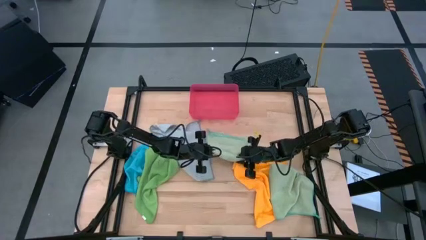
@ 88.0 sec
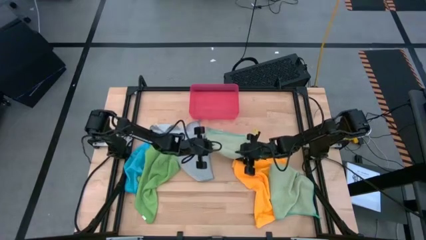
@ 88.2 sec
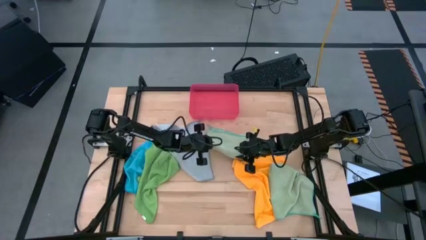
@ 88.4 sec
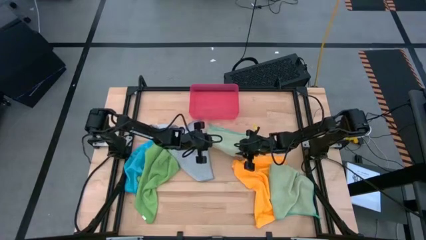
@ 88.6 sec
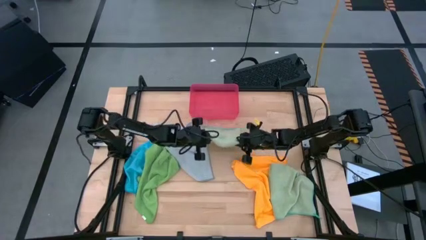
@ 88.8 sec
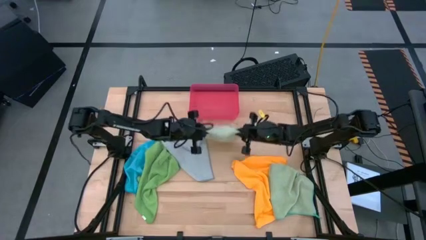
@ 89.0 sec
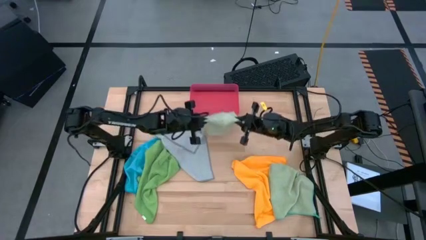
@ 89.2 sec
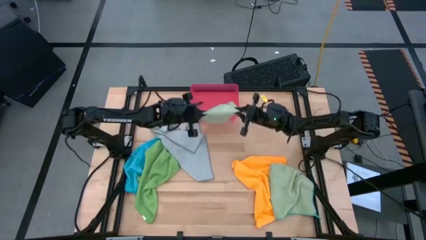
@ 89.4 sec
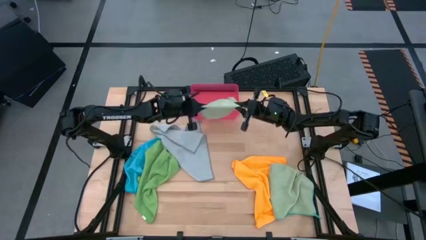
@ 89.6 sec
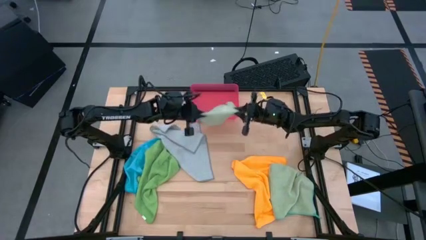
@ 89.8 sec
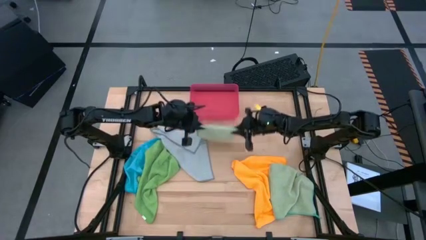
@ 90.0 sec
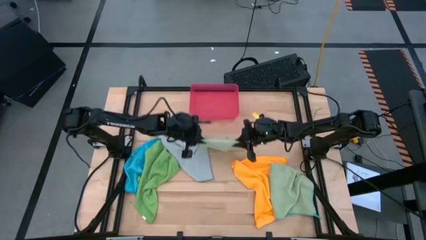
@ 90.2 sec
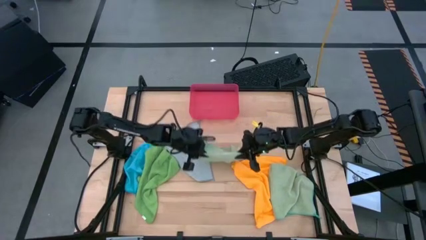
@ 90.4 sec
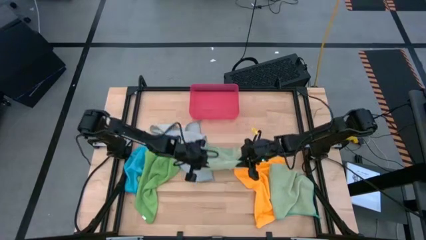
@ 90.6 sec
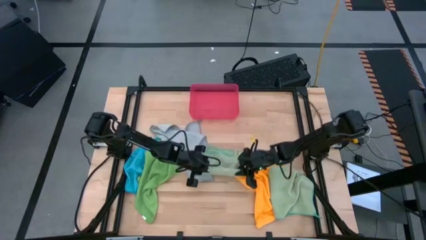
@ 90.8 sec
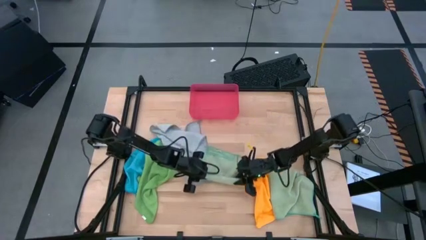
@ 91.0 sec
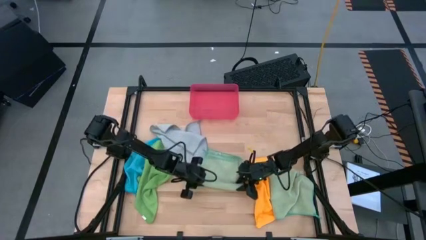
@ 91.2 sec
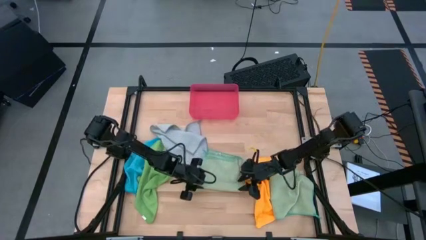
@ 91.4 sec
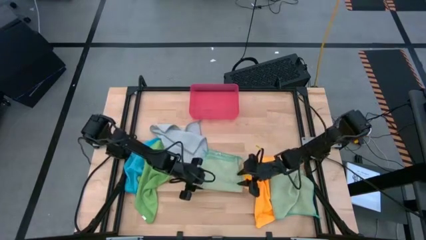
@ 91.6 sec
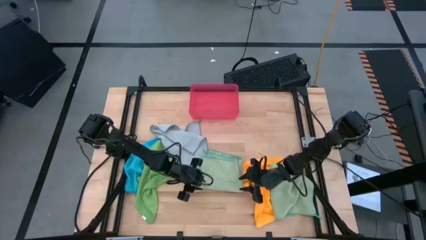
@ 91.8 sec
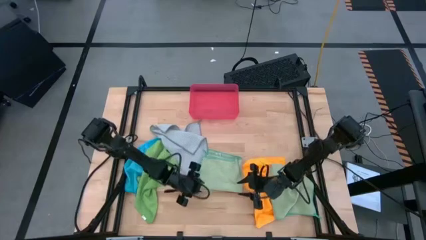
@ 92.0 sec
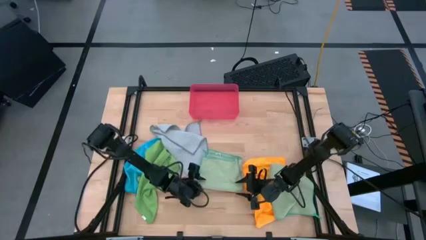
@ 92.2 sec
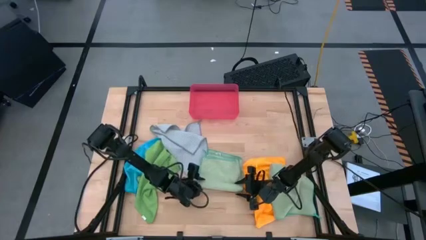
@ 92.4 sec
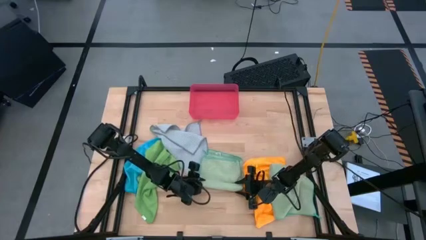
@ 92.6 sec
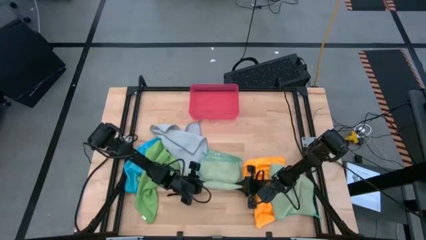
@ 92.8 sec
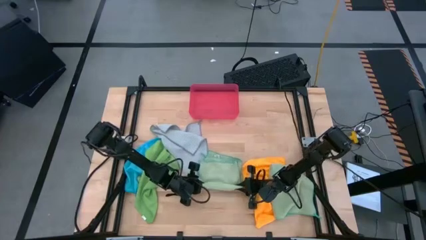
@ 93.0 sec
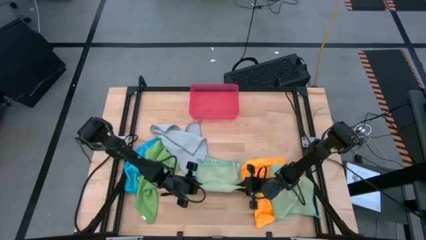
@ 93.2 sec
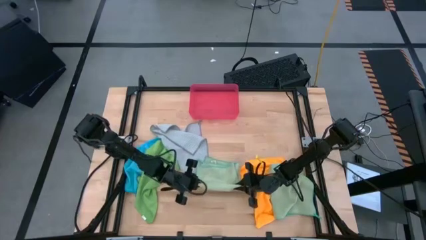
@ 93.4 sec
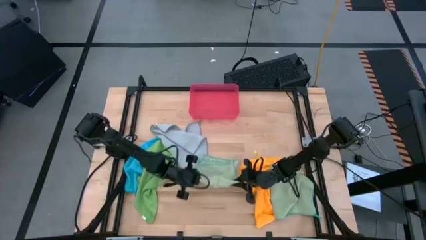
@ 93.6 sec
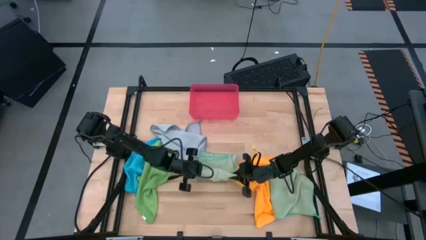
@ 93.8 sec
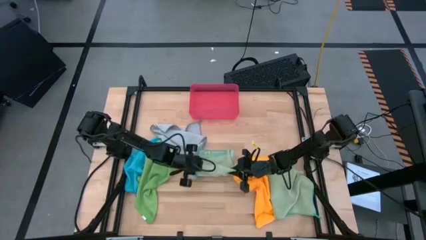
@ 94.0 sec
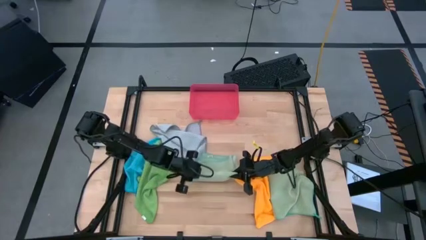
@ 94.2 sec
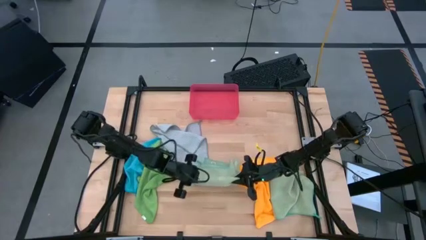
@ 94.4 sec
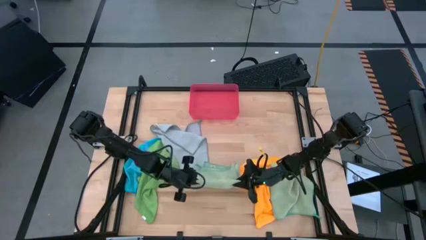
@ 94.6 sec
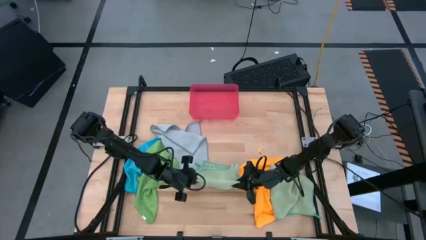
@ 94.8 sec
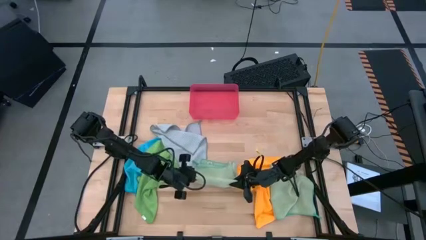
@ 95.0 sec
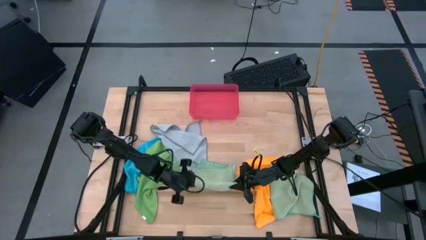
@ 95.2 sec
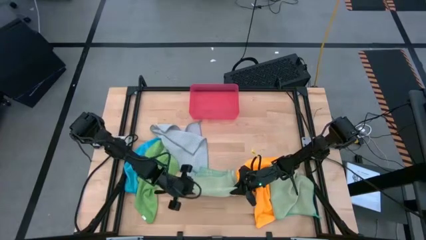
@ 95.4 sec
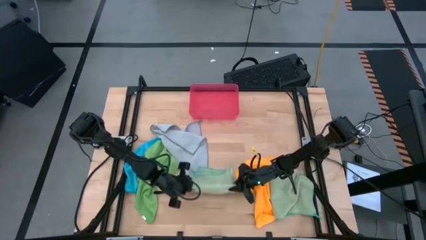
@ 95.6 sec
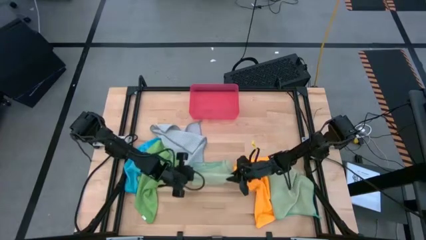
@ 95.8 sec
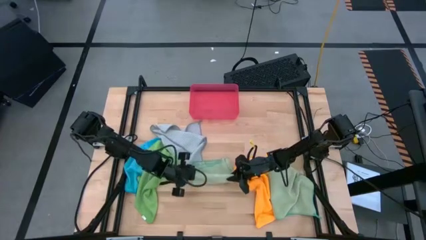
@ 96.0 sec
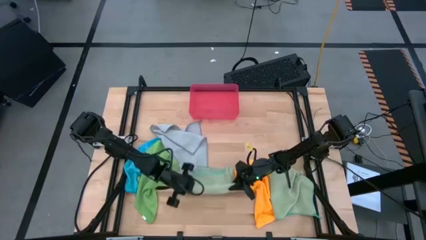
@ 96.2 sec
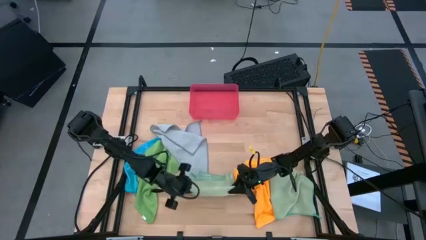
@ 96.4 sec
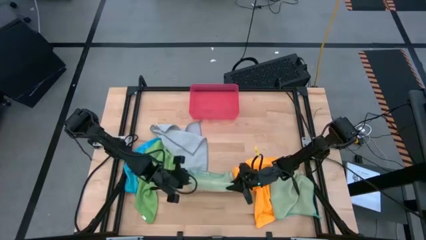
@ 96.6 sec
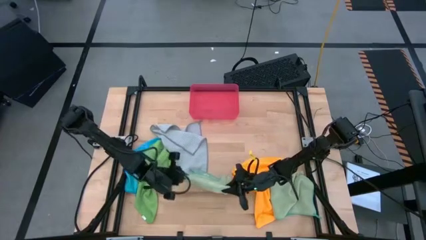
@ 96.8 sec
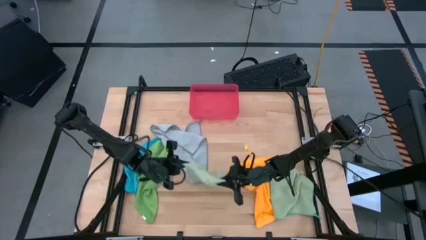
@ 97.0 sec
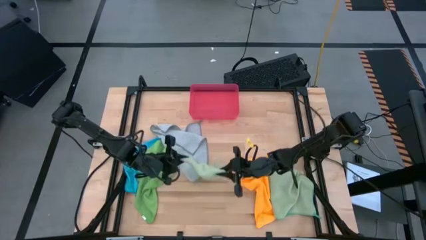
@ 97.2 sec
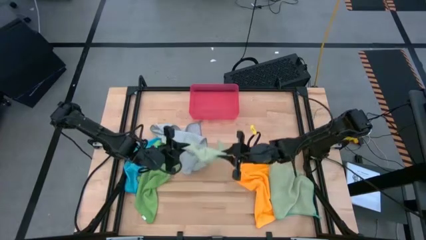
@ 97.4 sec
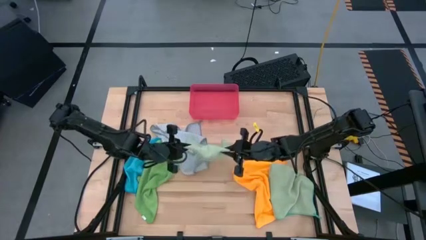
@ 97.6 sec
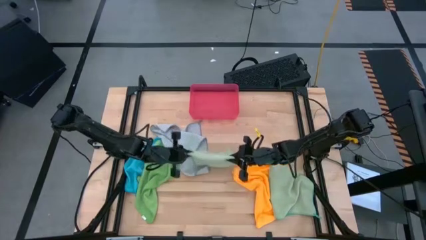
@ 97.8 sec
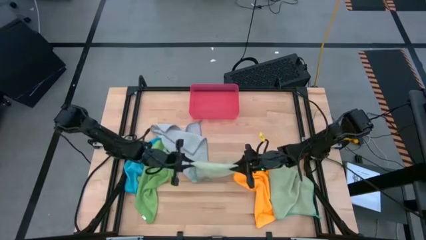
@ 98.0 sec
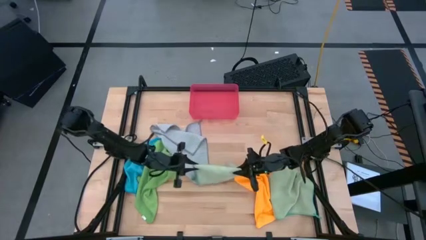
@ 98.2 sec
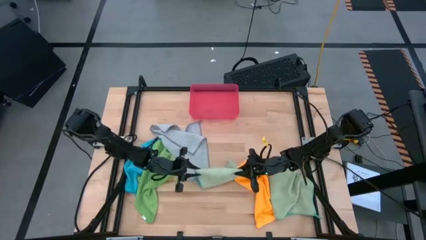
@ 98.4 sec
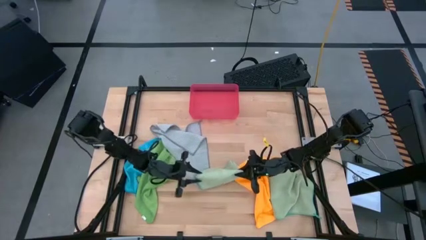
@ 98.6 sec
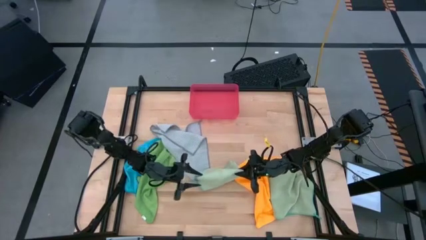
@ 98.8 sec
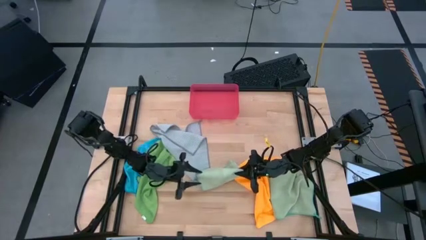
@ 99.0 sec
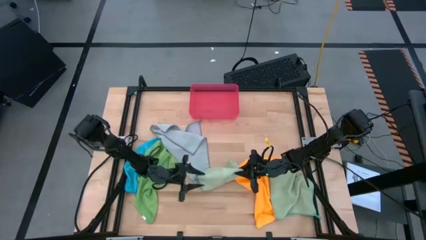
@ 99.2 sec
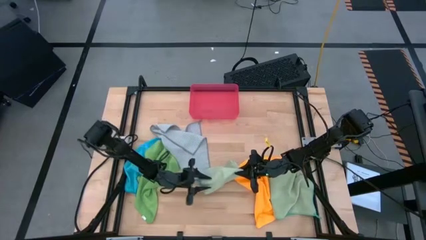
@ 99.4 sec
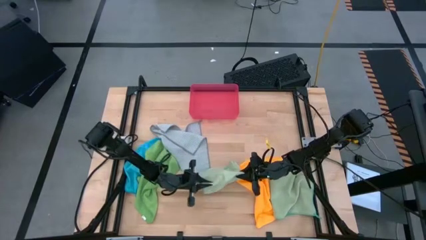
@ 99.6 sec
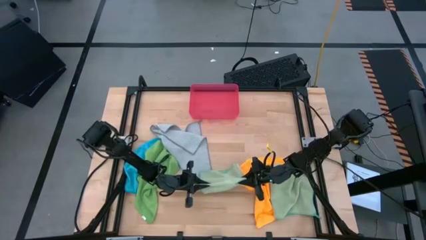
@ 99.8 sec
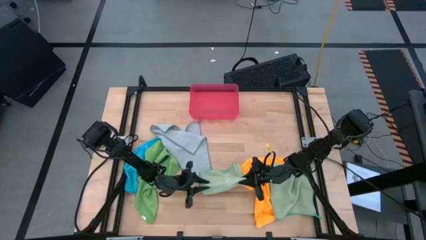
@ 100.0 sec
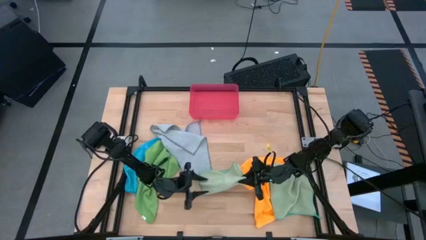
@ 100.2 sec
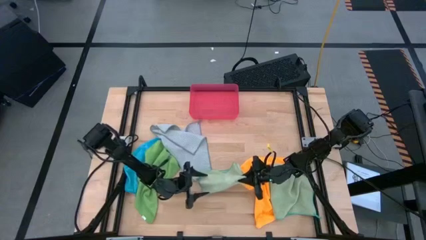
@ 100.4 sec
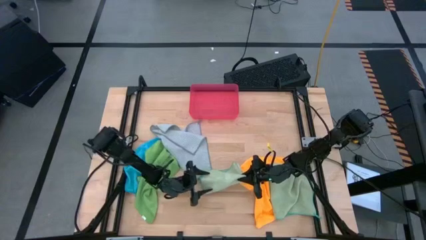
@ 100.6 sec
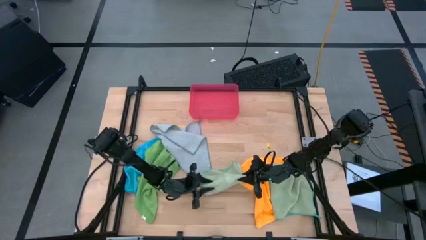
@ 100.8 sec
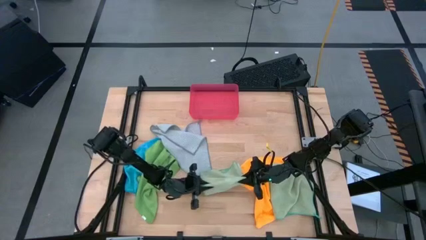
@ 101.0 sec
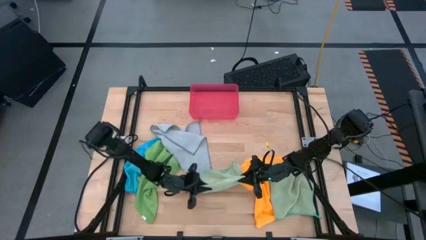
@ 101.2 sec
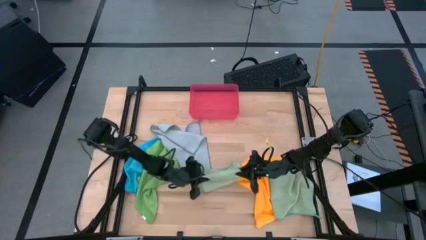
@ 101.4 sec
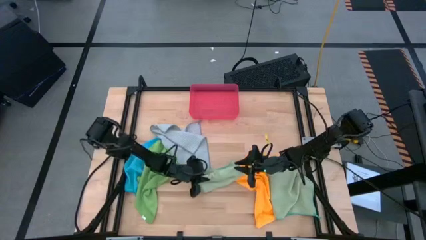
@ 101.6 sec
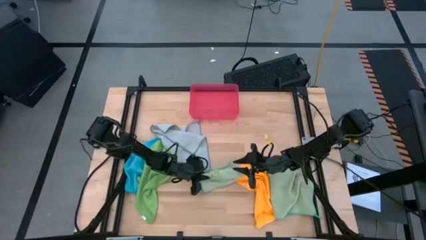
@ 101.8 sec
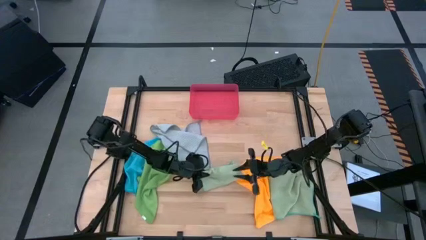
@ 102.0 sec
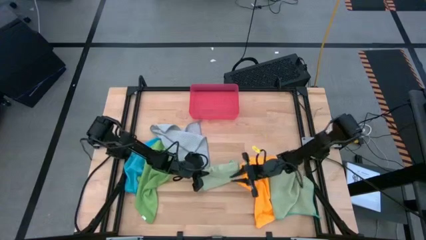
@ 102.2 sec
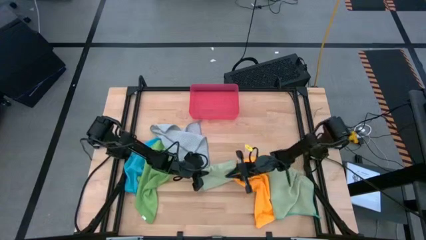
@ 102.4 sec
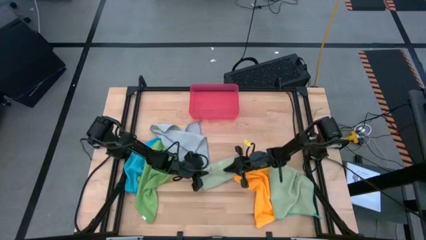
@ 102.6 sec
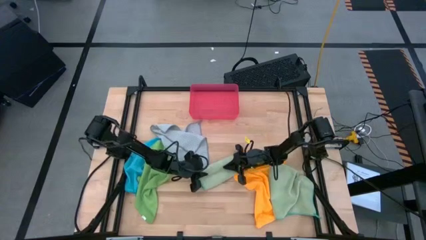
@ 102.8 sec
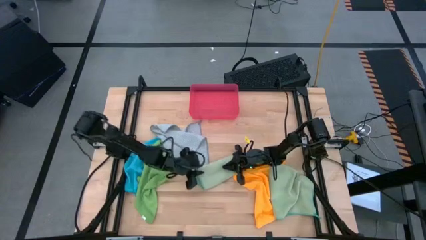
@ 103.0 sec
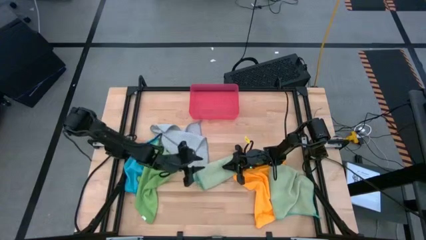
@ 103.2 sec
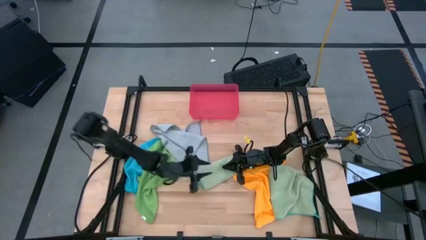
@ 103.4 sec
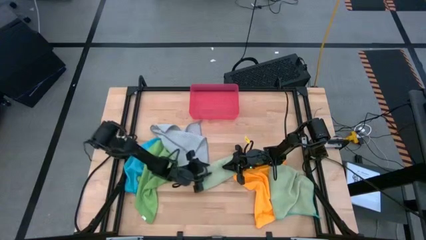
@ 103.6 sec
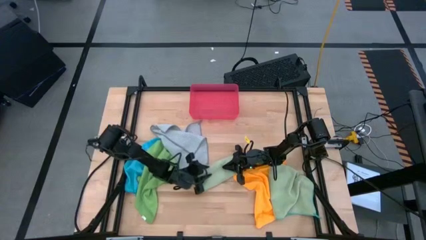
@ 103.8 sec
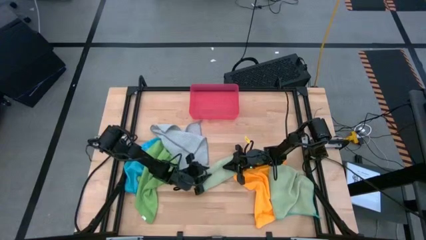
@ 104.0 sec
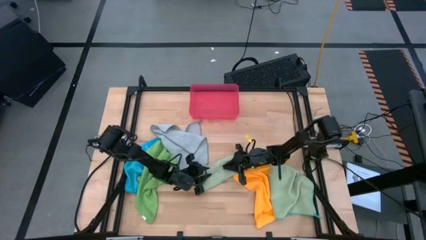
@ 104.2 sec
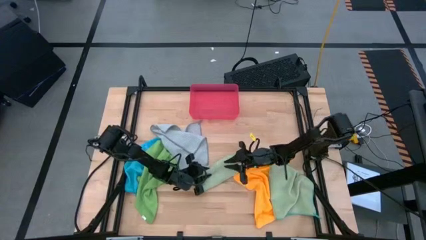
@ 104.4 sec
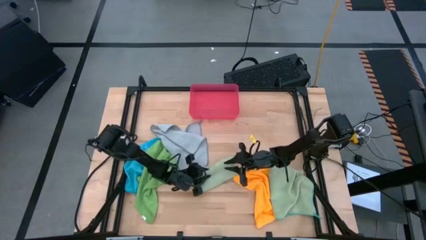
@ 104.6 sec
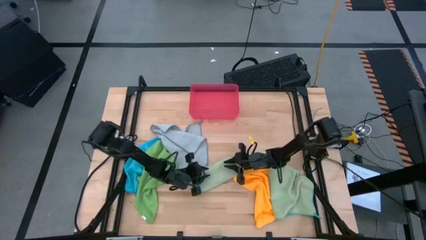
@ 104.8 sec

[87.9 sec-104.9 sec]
Task: Fold microfiber towels
Fold the top light green towel
